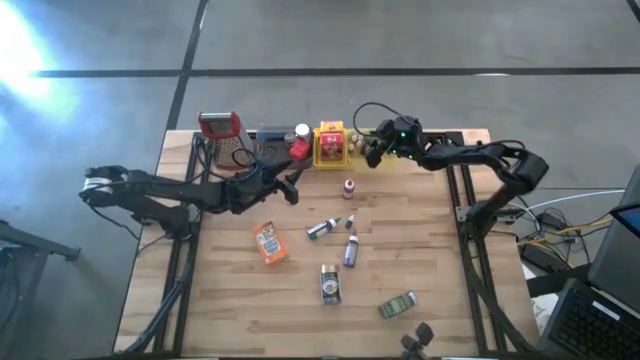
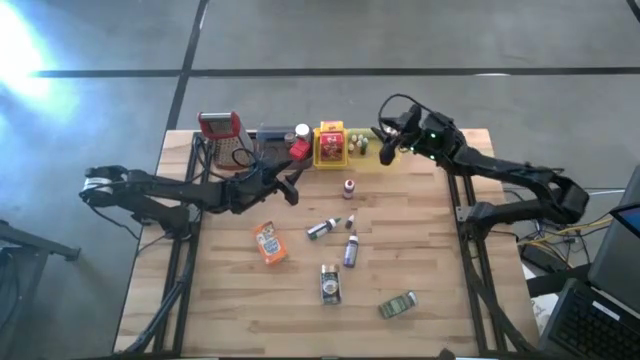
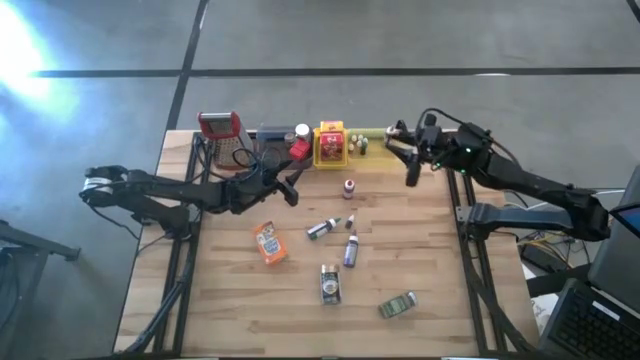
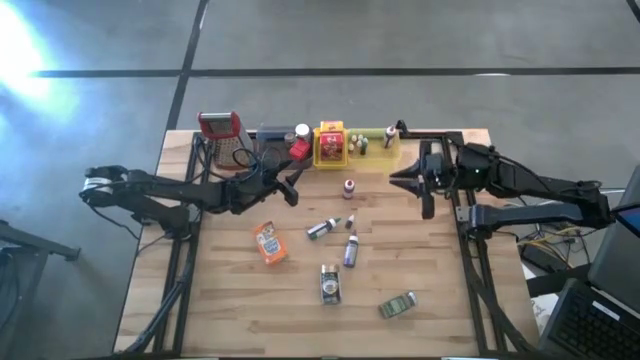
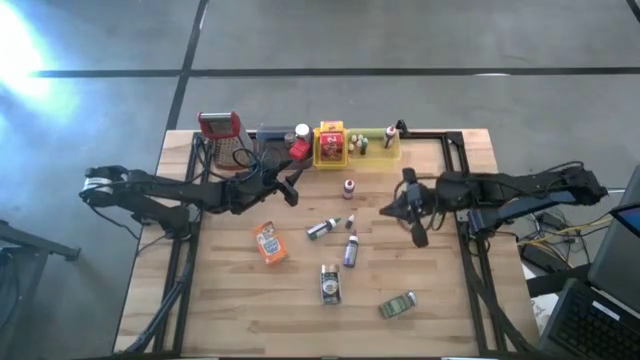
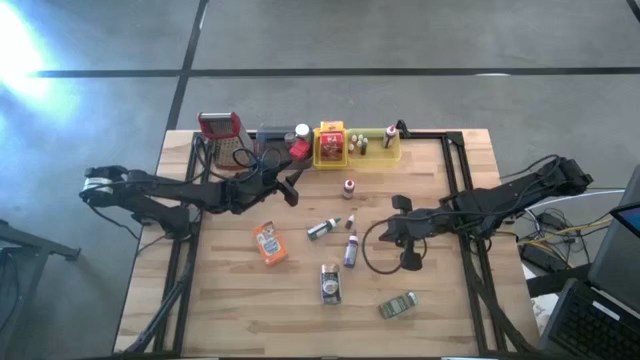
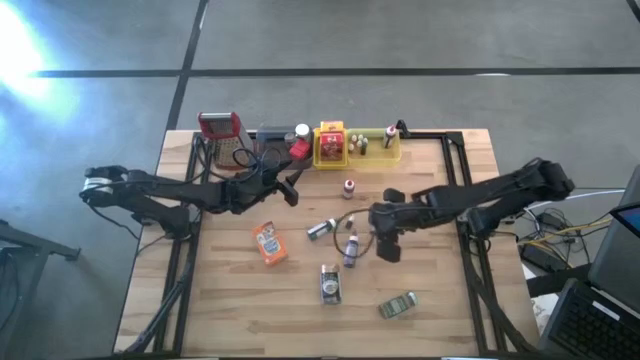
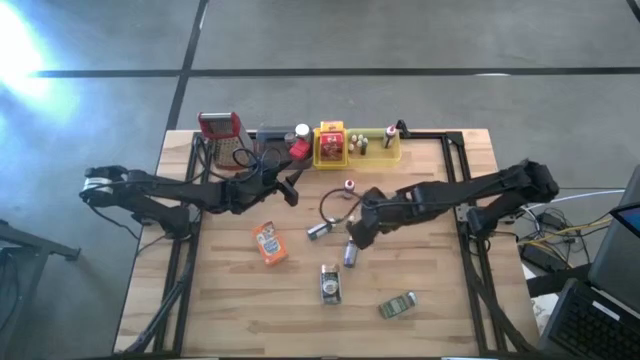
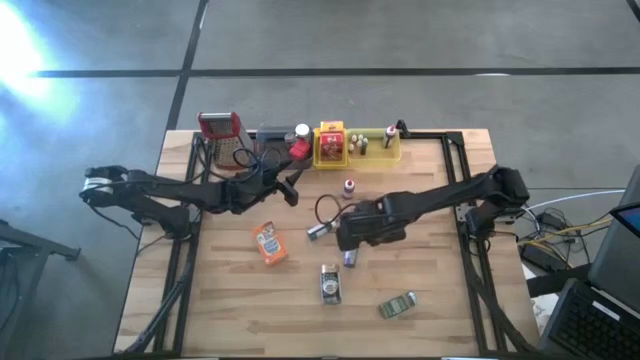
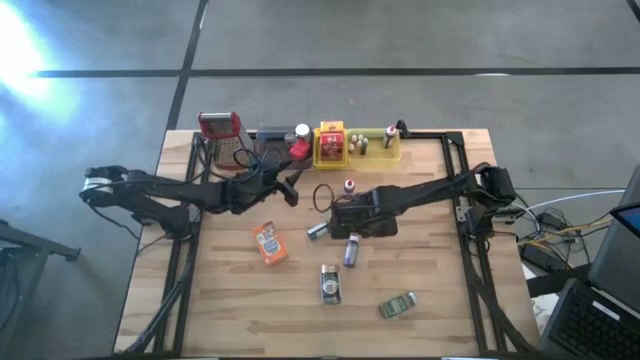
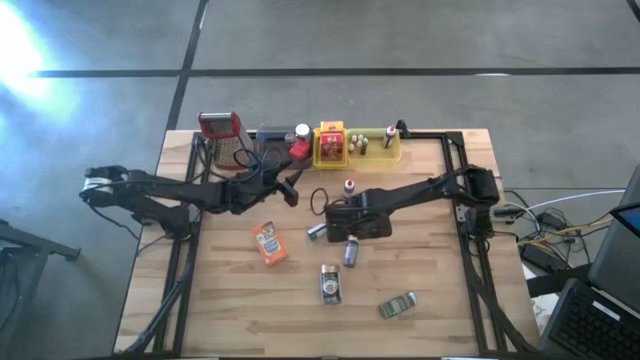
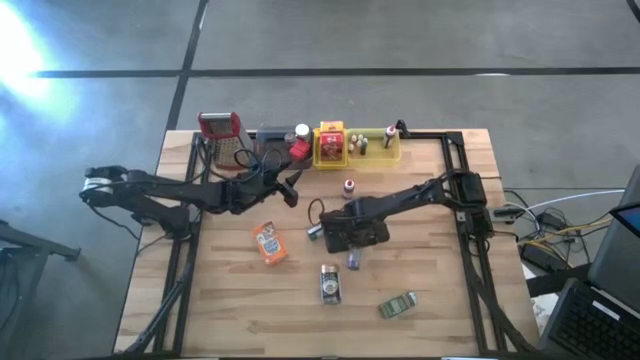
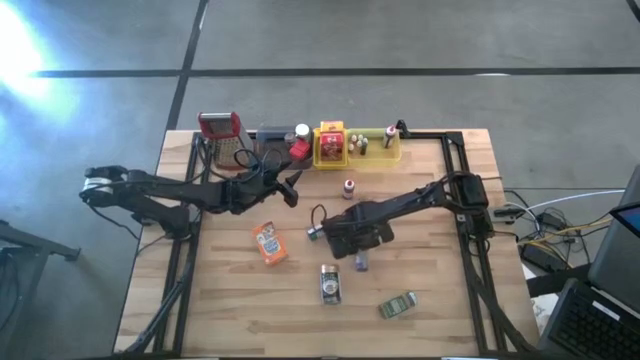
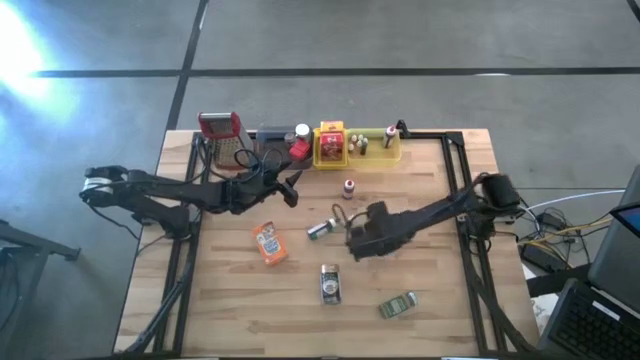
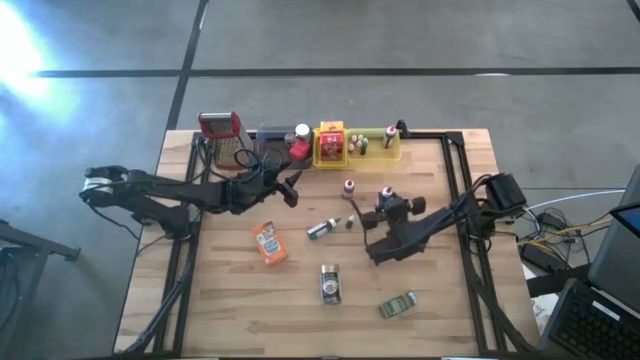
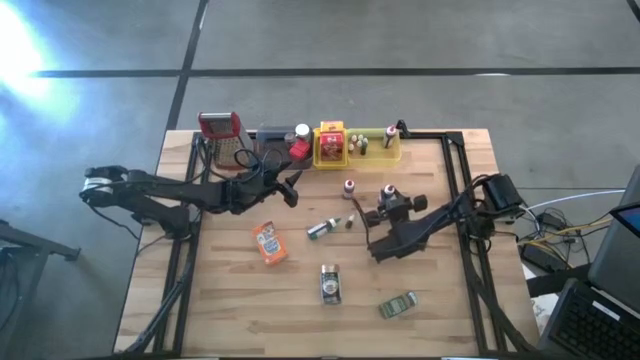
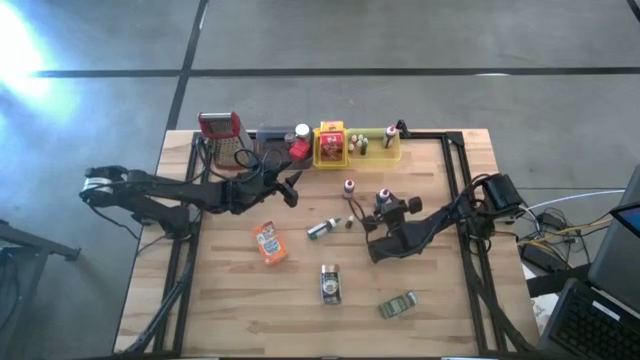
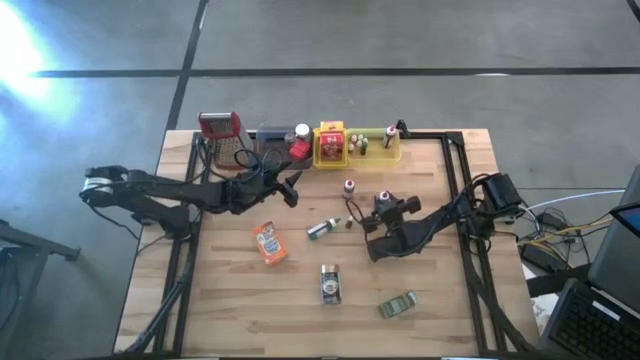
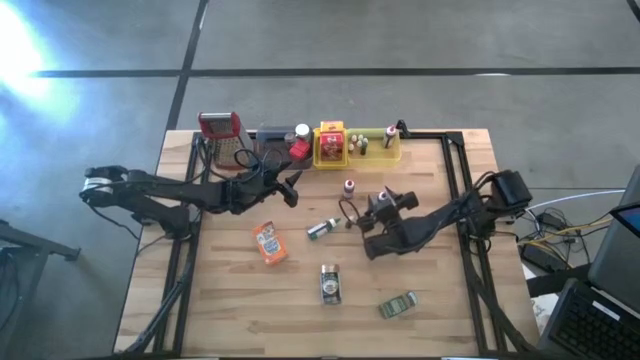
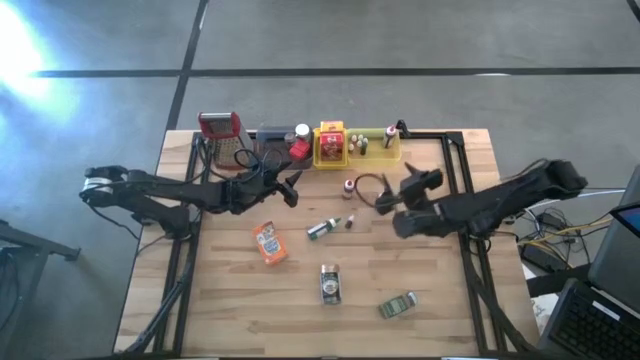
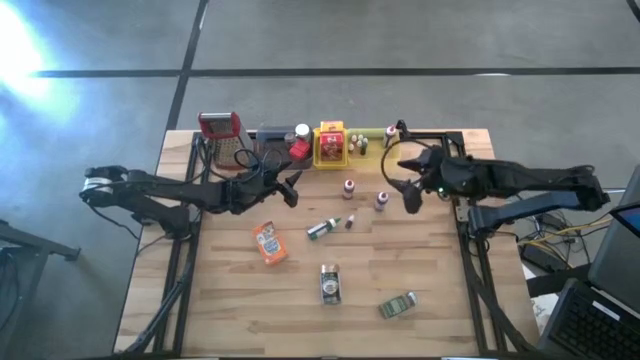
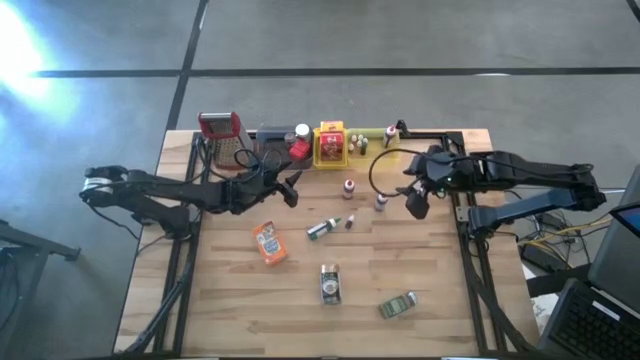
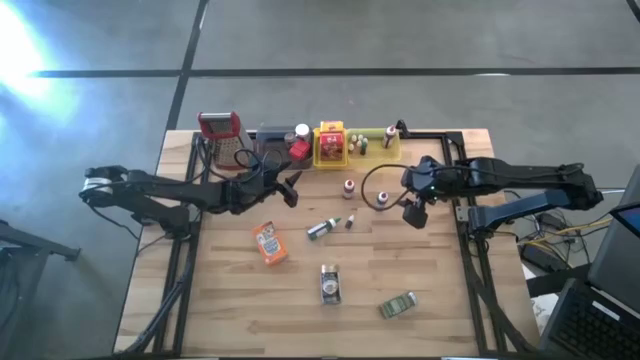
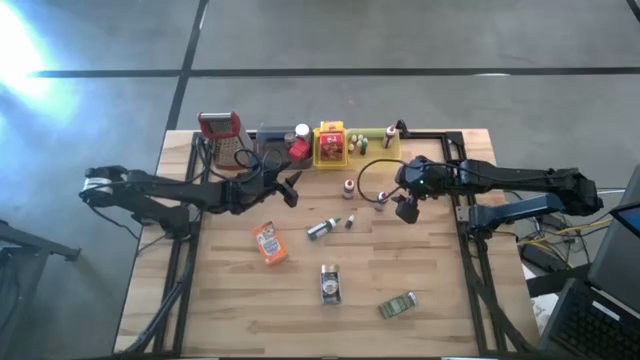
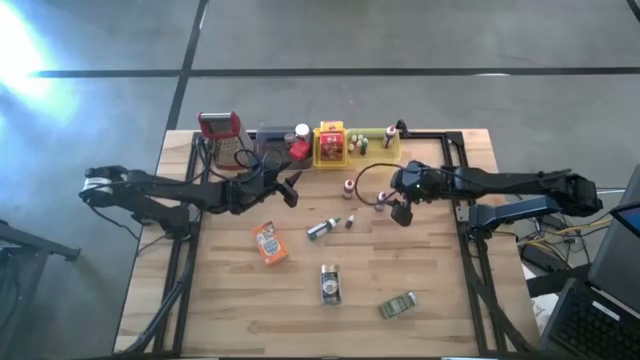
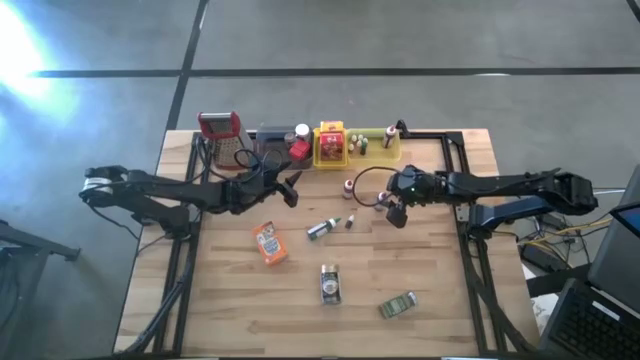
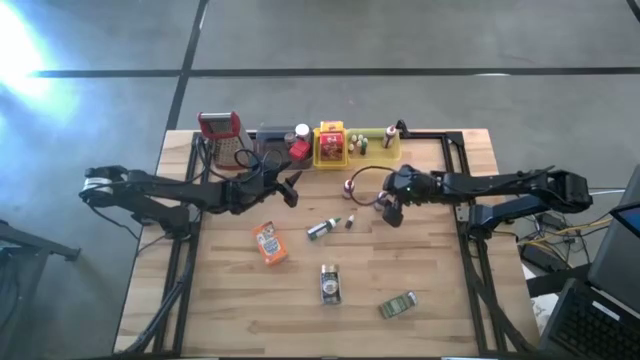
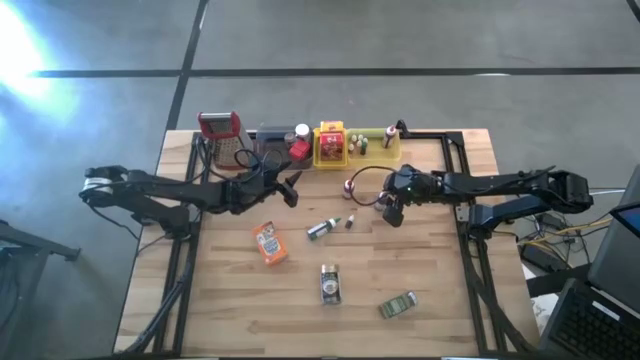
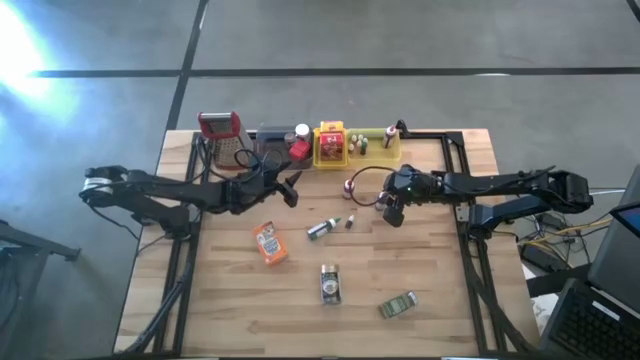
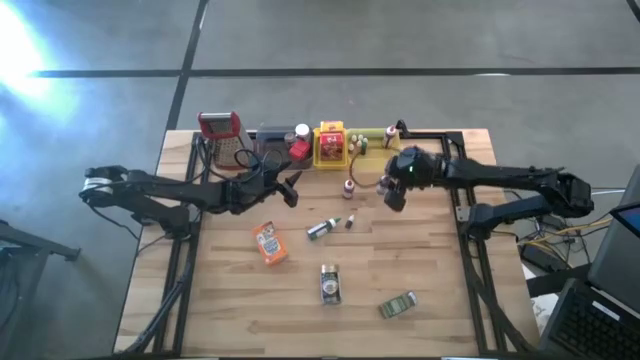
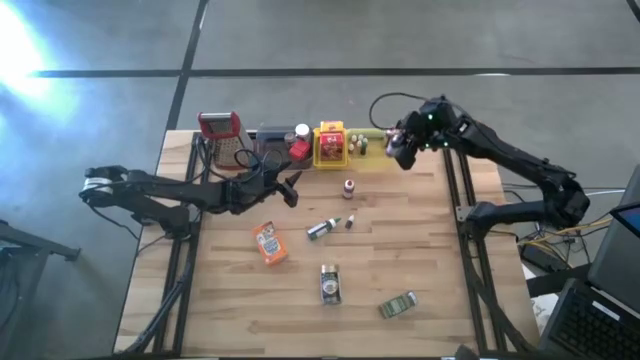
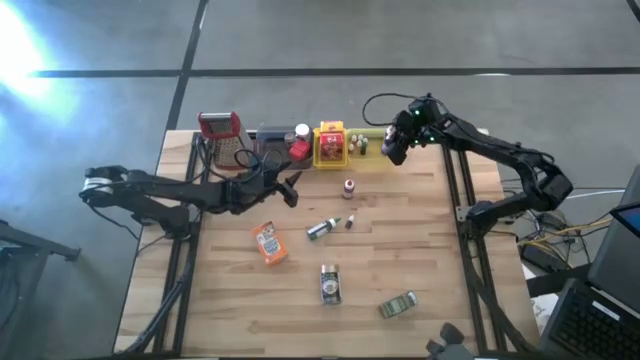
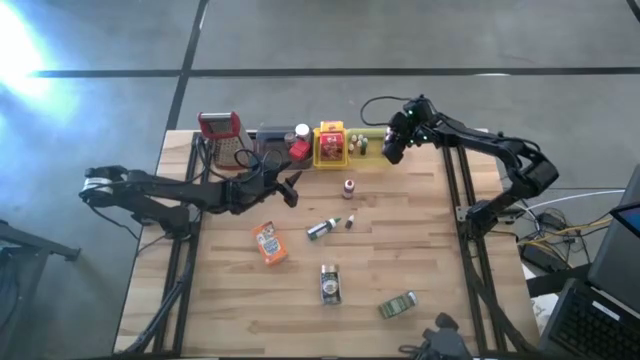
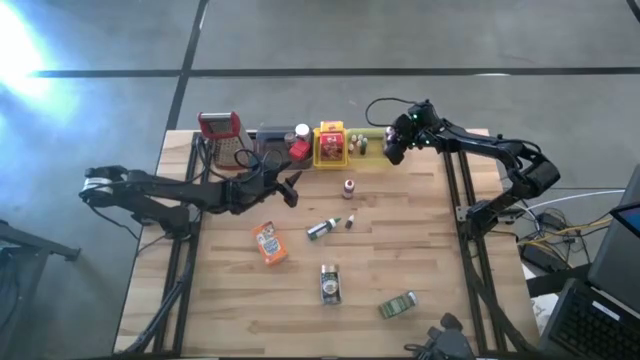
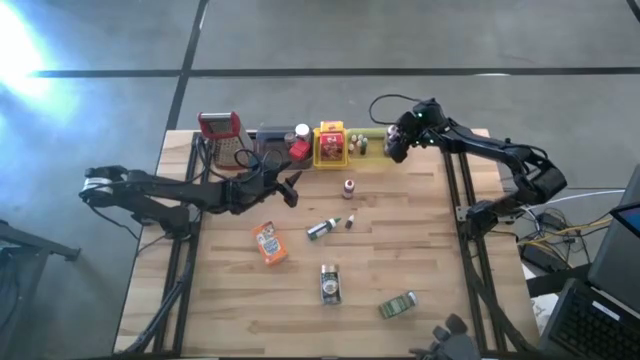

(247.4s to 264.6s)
Task: Pick & Place Kitchen Items
Put the large purple food coloring bottle into the light yellow bin
